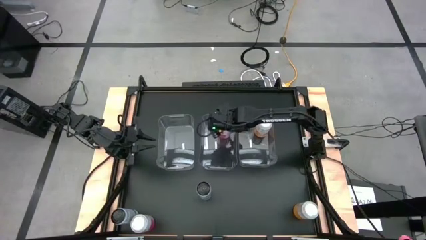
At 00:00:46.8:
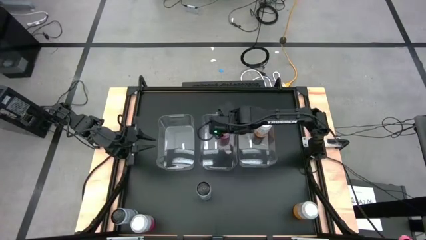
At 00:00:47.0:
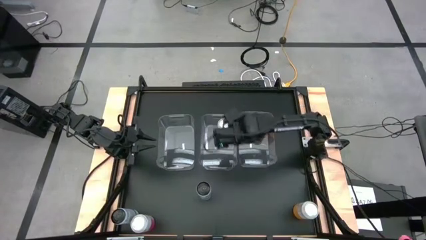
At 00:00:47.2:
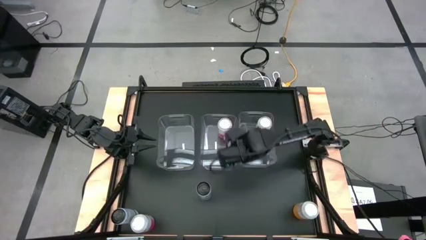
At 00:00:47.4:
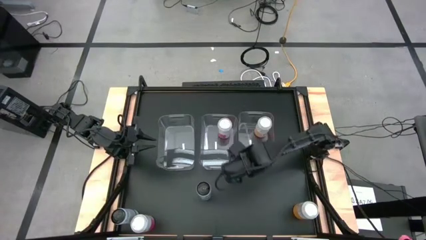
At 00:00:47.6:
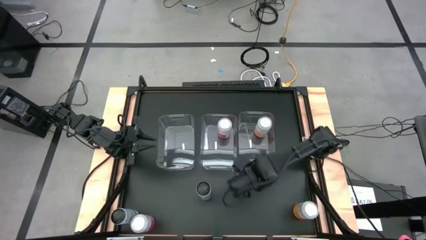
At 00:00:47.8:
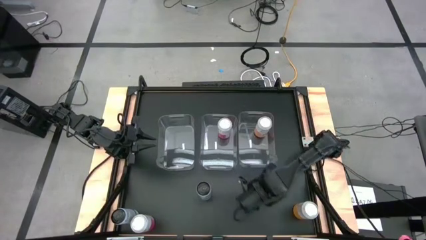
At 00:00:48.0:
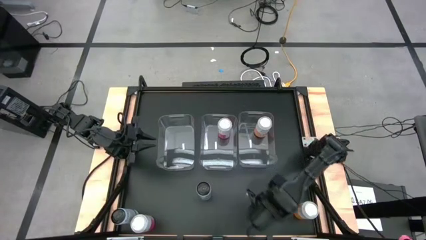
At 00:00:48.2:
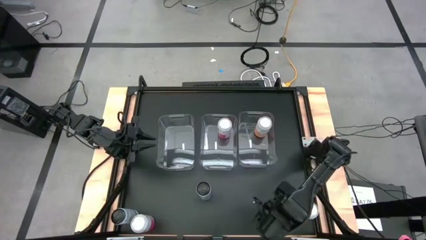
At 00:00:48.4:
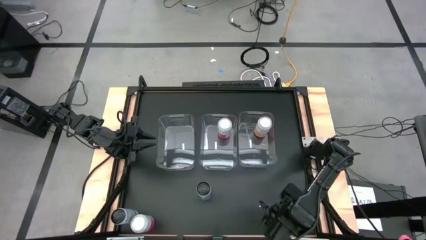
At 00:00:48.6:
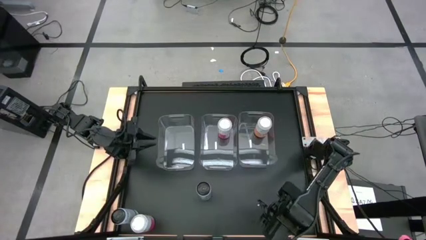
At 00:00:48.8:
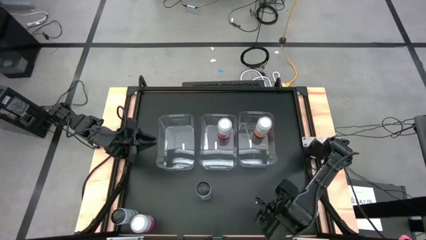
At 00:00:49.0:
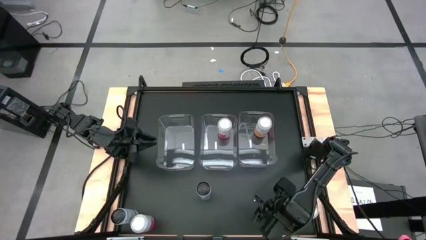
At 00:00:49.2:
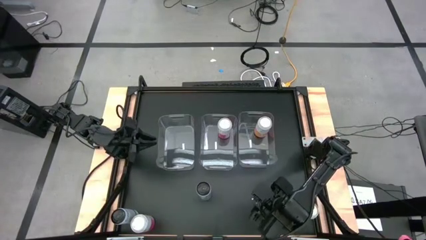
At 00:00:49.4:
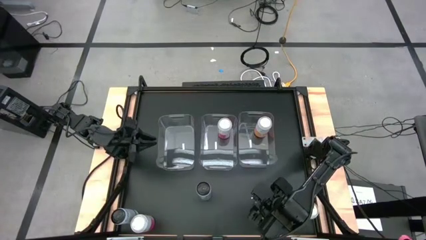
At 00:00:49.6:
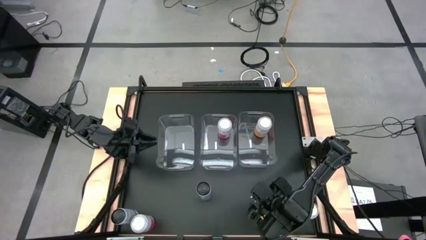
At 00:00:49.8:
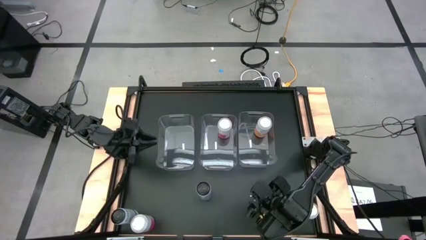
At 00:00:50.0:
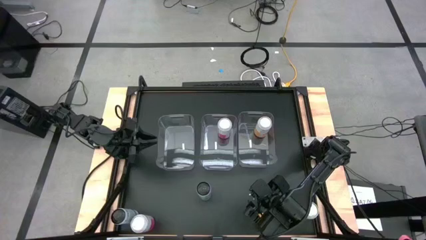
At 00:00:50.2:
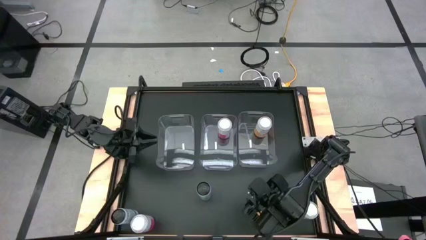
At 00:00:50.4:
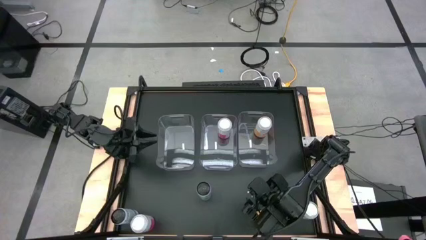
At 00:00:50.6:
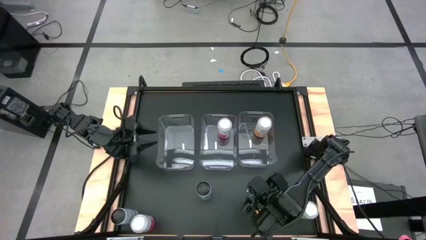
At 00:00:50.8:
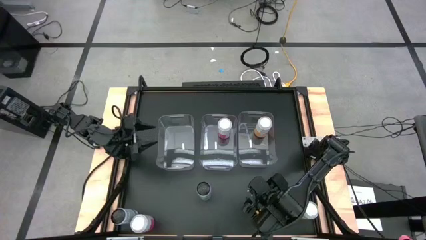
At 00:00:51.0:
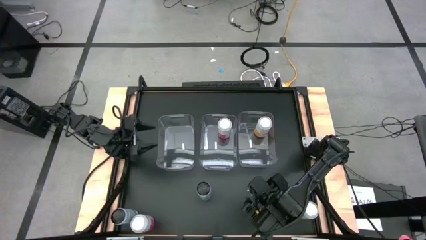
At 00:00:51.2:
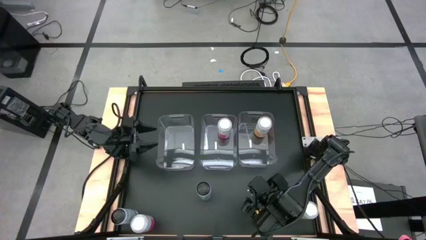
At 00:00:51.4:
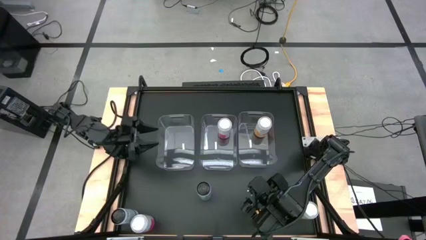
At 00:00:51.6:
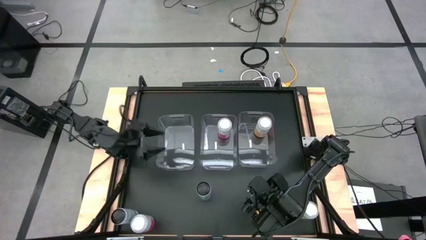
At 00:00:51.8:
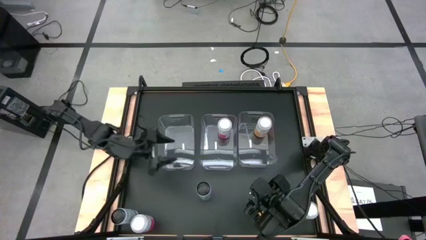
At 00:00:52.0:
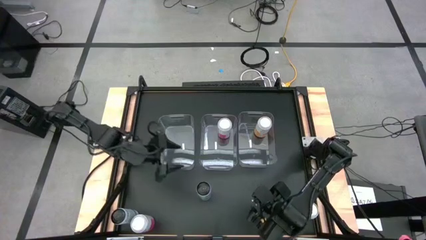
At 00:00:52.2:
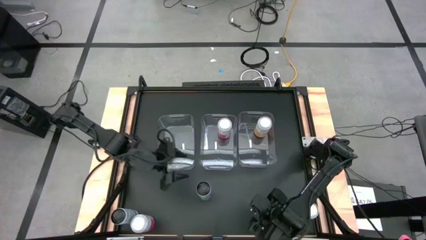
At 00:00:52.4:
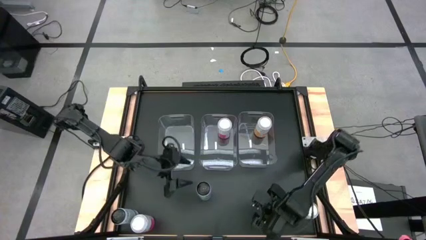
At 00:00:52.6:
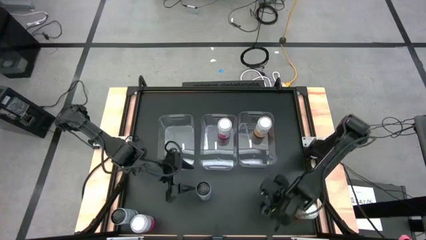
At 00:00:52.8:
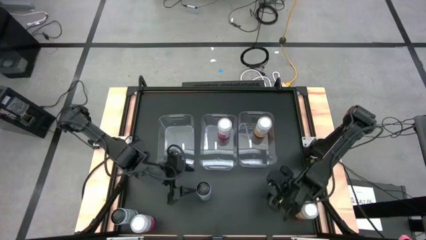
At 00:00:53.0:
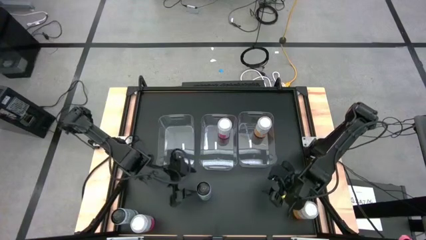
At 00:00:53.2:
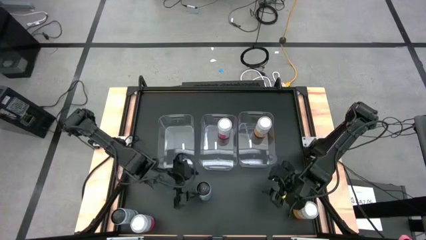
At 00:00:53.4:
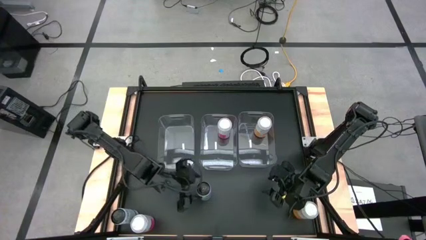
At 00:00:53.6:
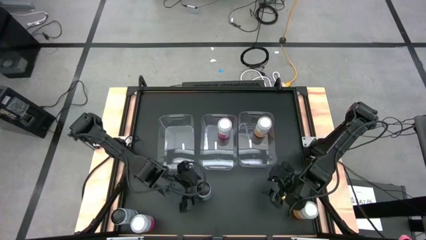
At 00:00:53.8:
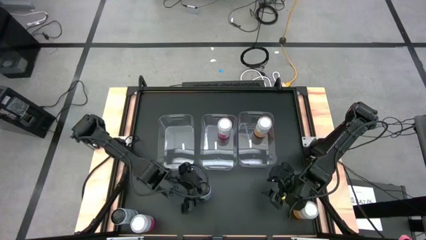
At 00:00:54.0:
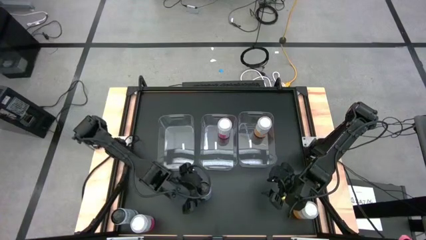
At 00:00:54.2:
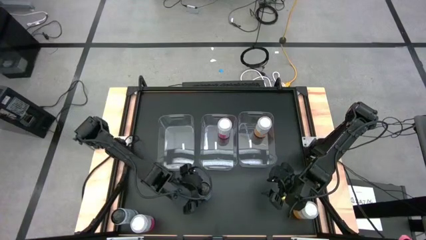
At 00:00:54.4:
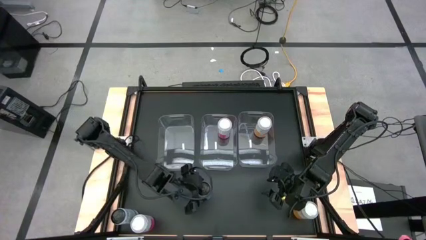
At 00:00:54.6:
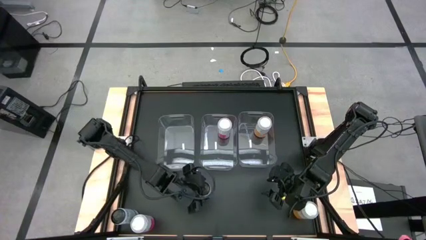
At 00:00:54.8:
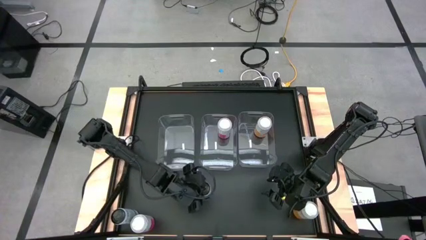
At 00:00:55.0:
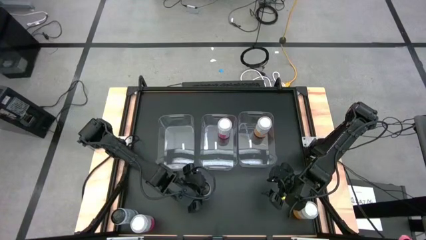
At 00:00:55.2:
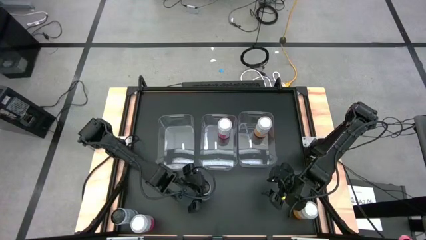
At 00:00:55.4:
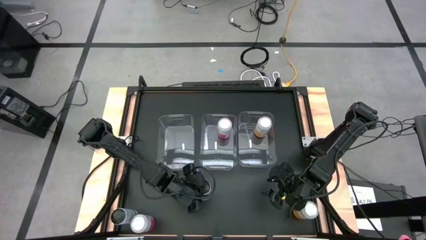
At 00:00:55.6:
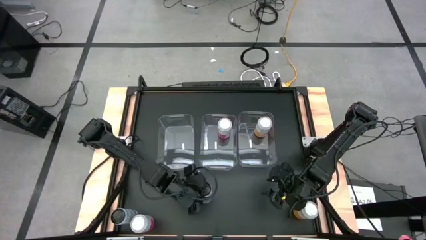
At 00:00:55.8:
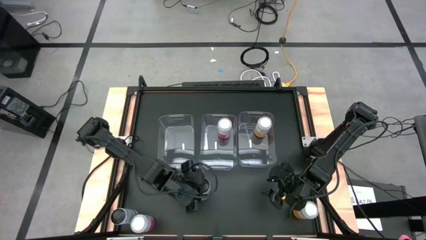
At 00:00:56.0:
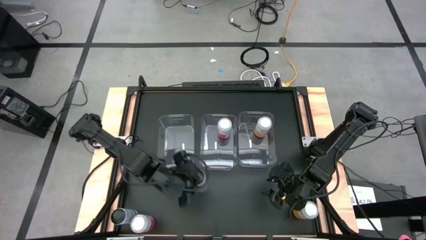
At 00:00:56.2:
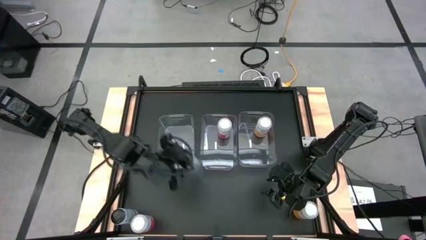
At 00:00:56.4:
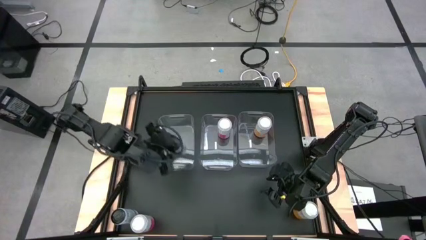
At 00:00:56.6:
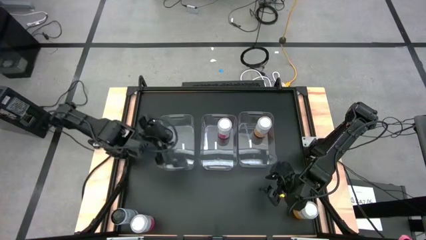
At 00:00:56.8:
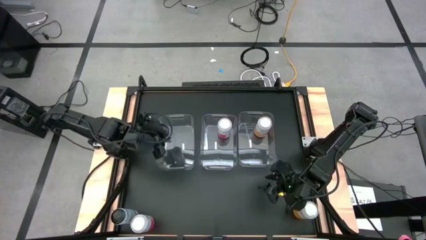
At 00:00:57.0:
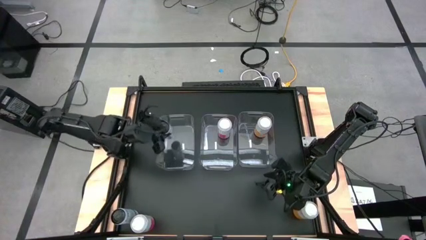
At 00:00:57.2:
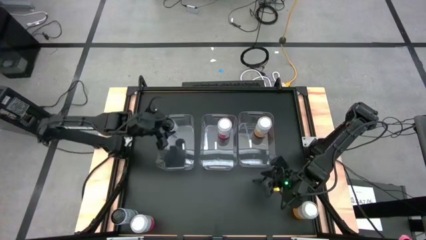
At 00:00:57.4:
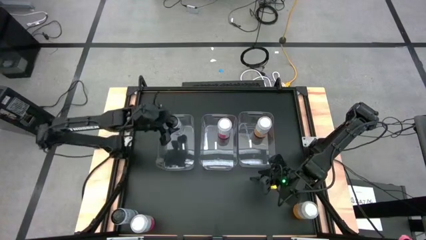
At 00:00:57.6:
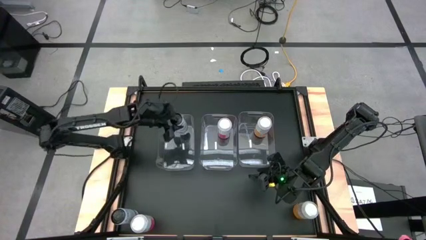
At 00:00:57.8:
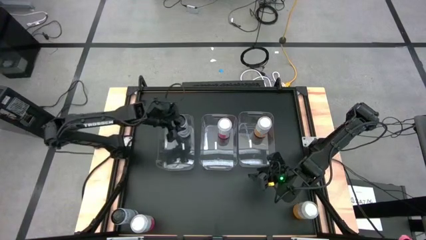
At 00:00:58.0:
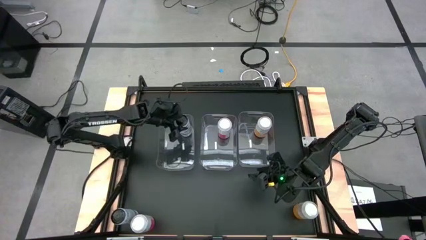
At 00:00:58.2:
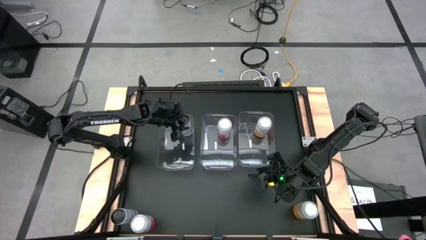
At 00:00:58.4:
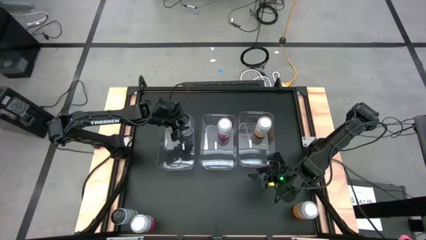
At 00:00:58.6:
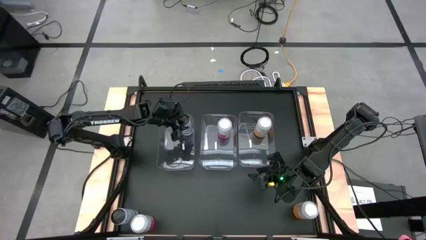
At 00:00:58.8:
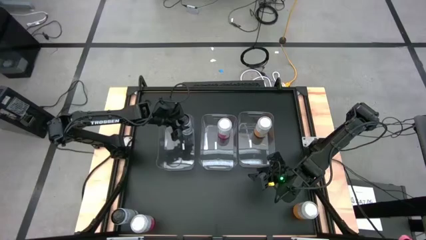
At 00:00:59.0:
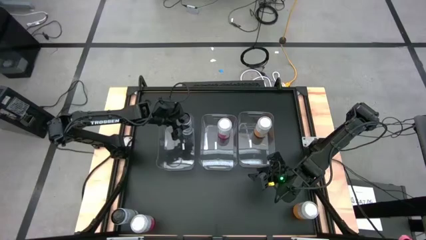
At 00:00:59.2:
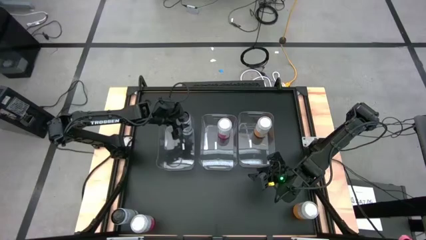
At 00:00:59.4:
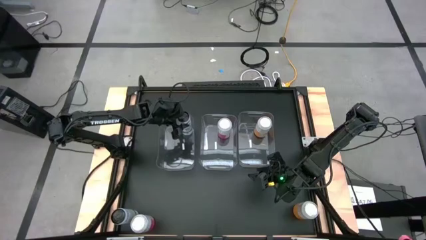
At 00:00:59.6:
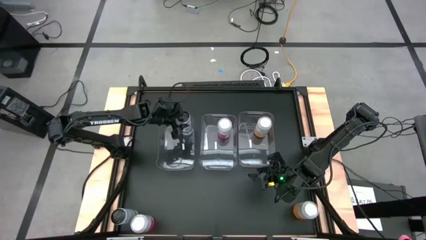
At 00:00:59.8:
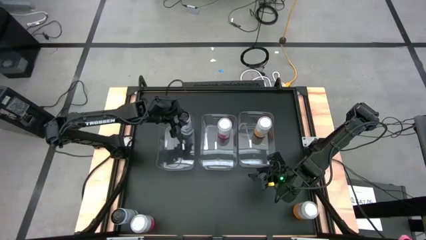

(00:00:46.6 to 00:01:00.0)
Task: Sort soda cans
Put the right white soda can into the left transparent bin
